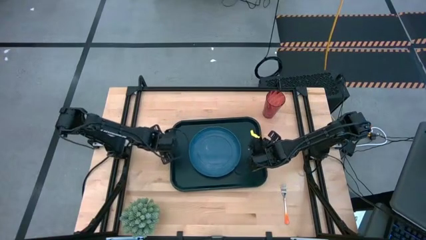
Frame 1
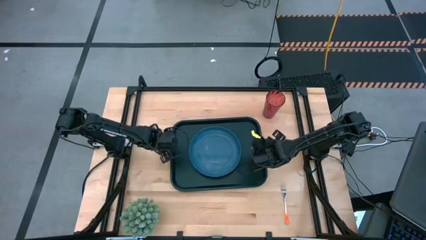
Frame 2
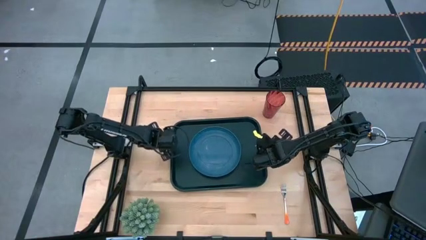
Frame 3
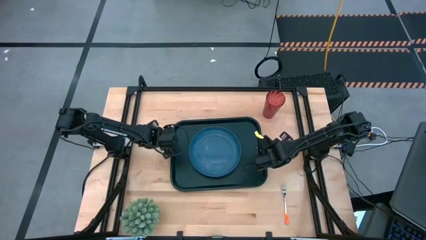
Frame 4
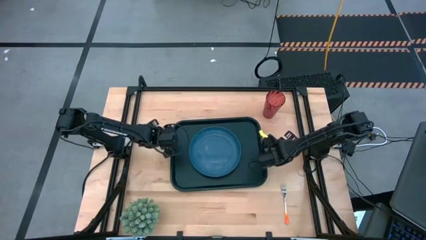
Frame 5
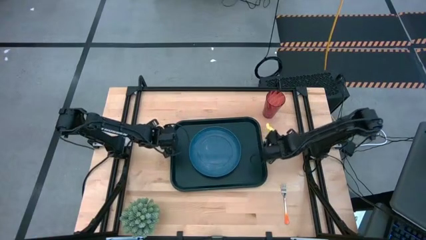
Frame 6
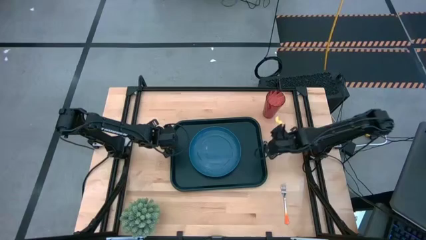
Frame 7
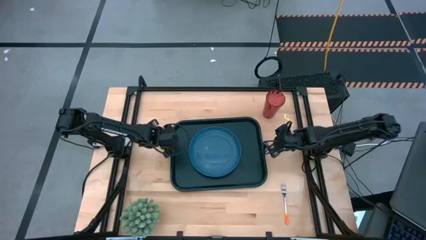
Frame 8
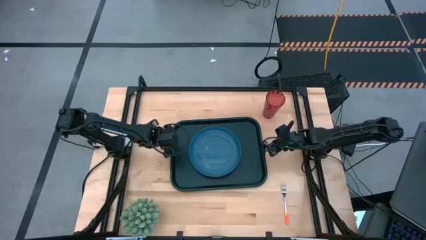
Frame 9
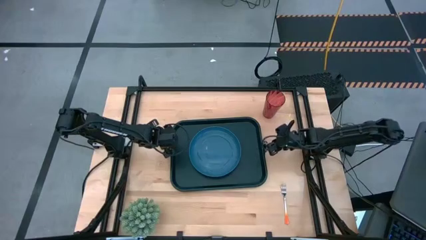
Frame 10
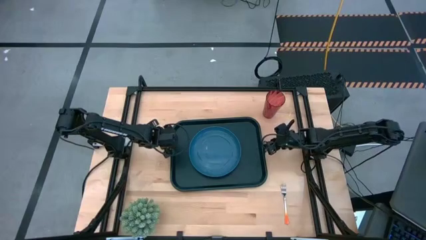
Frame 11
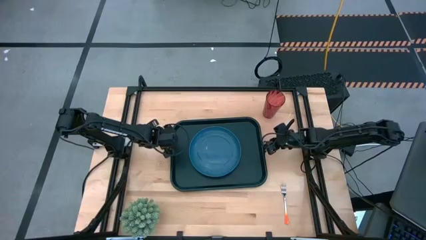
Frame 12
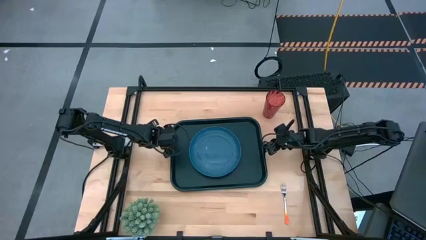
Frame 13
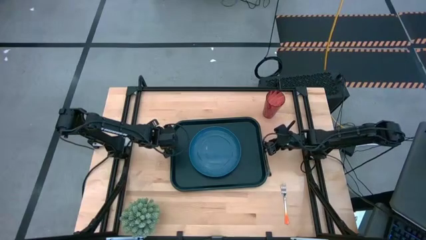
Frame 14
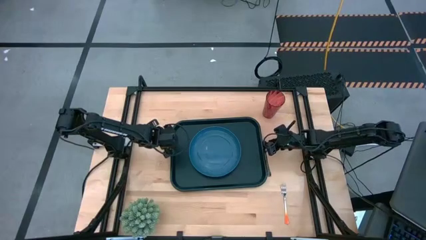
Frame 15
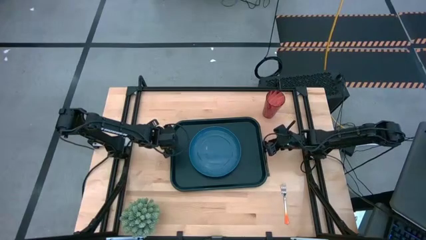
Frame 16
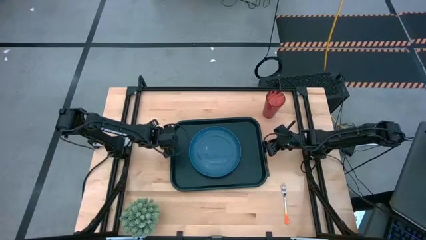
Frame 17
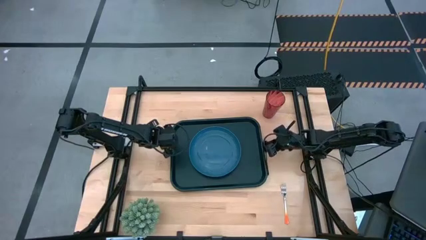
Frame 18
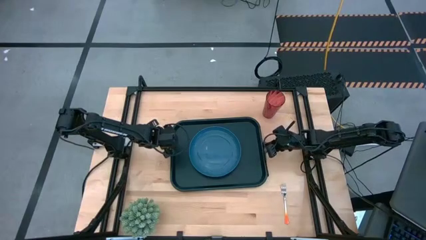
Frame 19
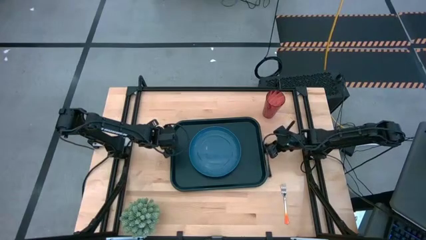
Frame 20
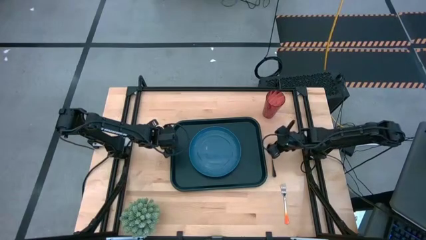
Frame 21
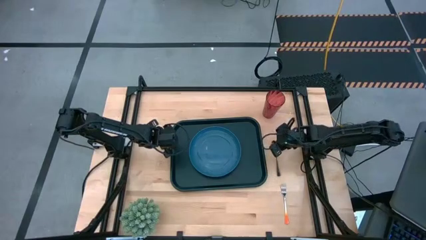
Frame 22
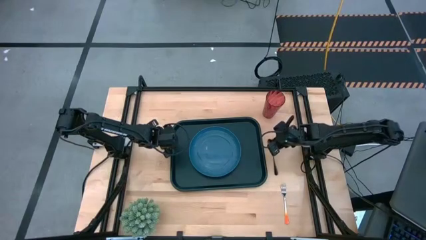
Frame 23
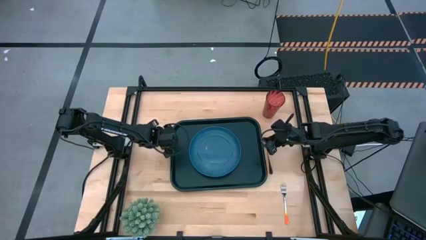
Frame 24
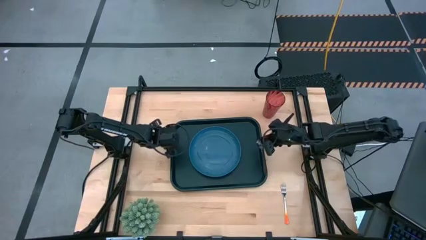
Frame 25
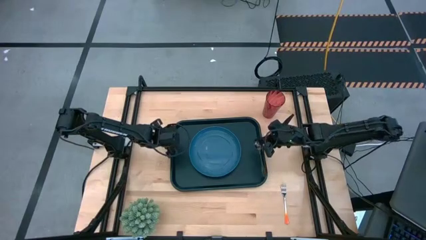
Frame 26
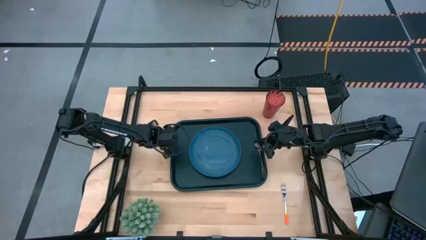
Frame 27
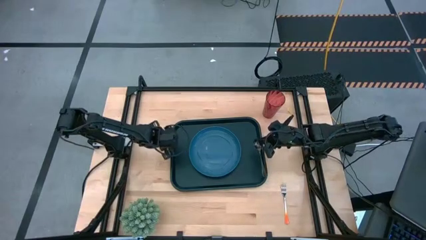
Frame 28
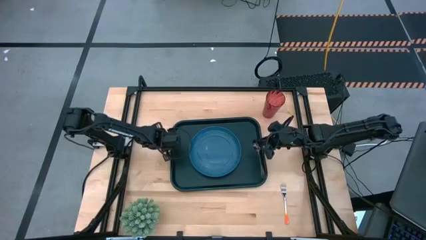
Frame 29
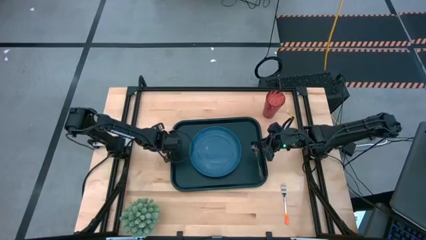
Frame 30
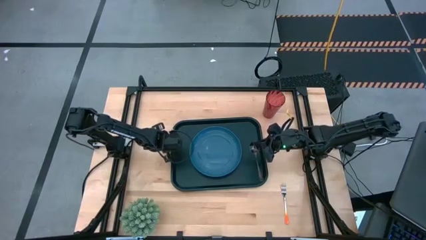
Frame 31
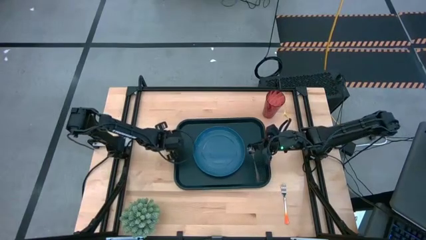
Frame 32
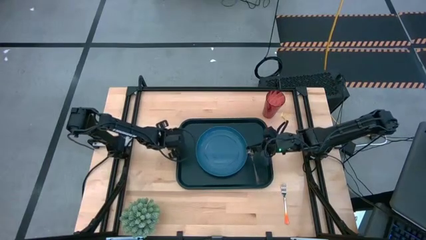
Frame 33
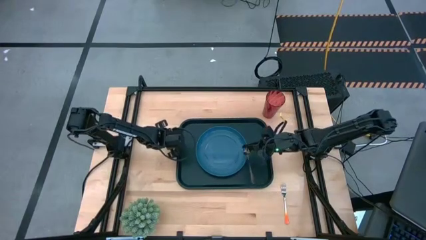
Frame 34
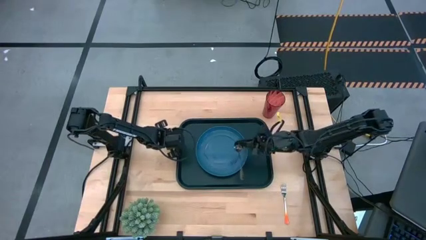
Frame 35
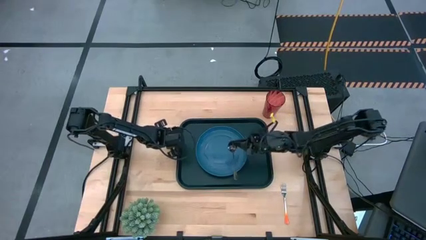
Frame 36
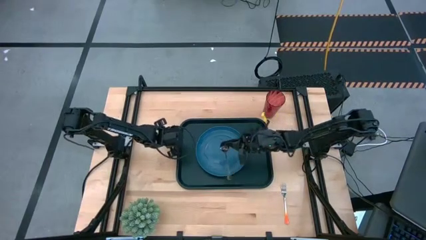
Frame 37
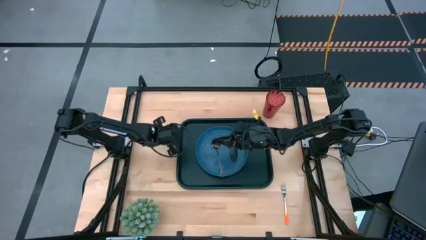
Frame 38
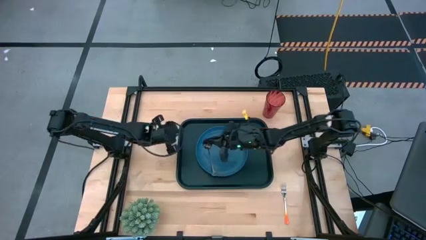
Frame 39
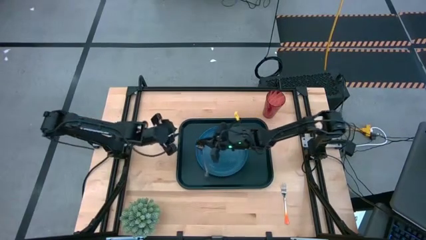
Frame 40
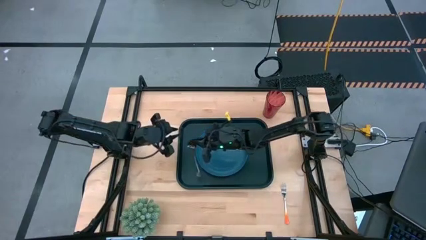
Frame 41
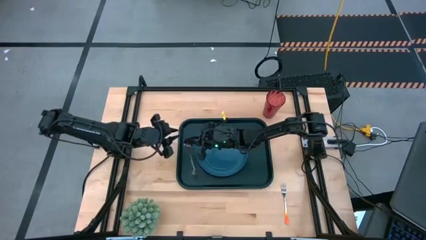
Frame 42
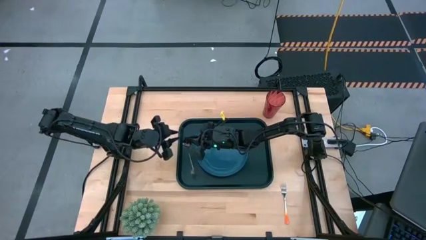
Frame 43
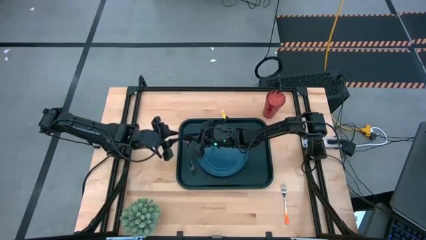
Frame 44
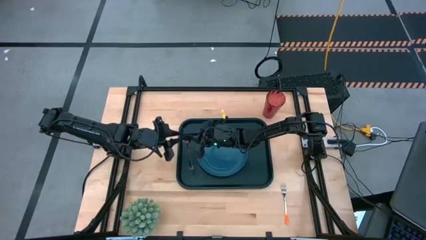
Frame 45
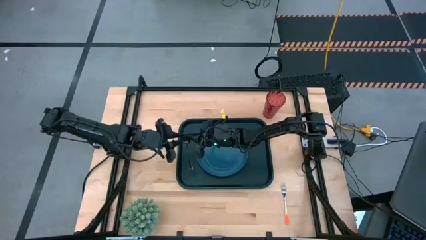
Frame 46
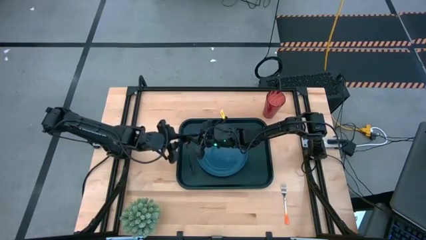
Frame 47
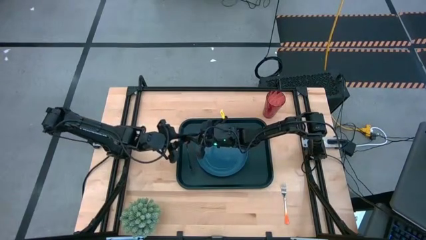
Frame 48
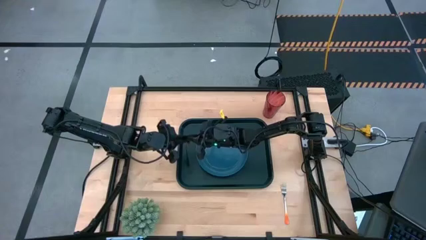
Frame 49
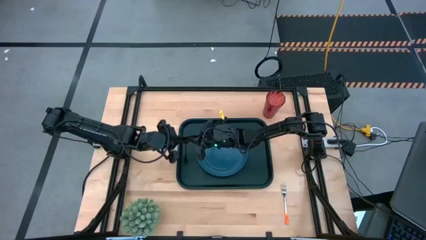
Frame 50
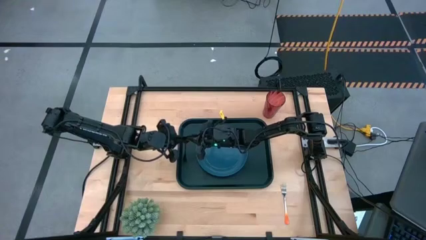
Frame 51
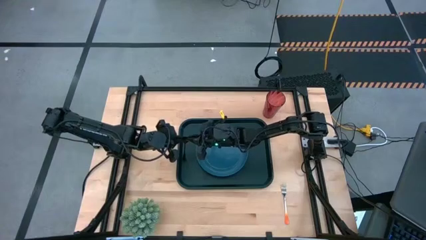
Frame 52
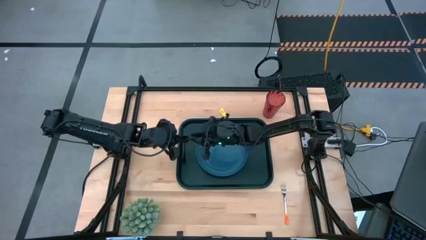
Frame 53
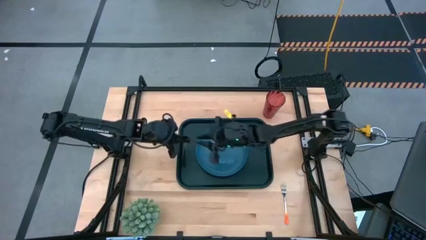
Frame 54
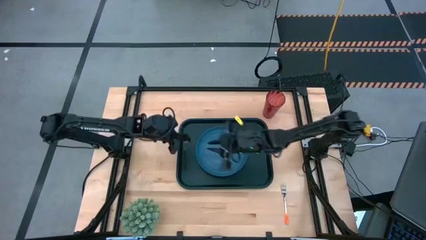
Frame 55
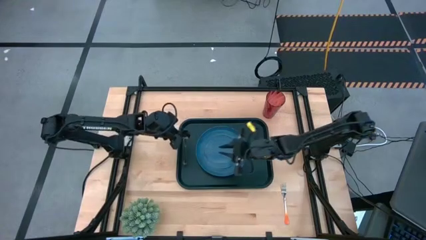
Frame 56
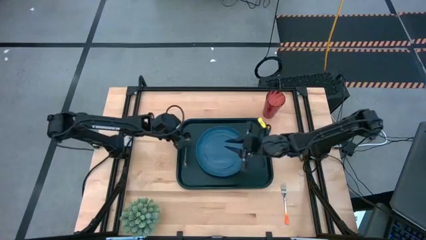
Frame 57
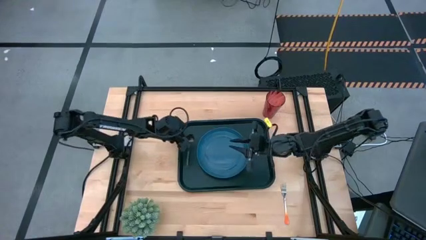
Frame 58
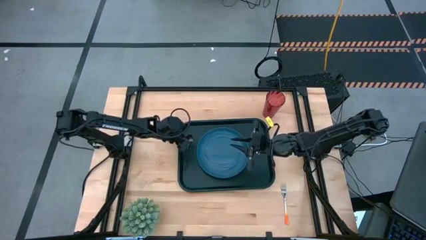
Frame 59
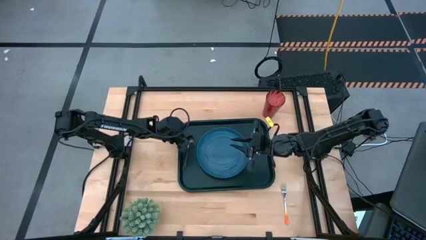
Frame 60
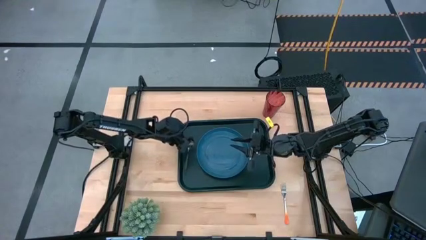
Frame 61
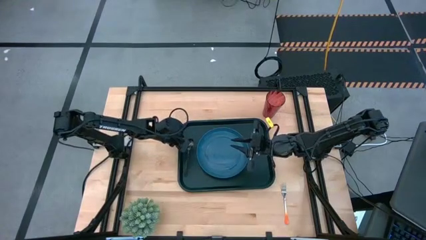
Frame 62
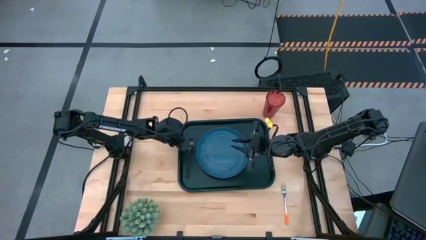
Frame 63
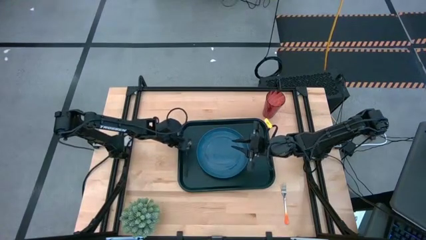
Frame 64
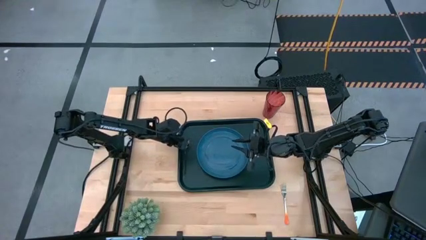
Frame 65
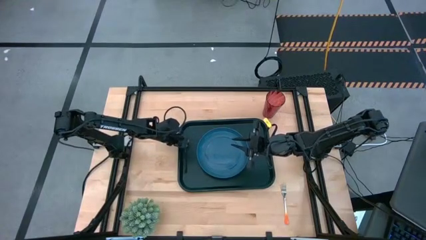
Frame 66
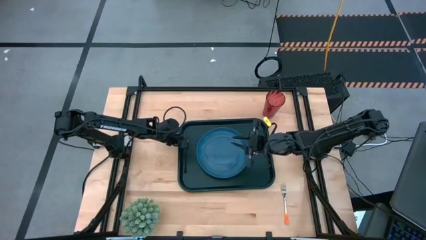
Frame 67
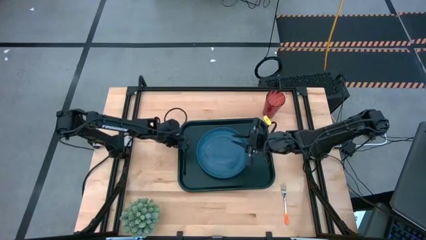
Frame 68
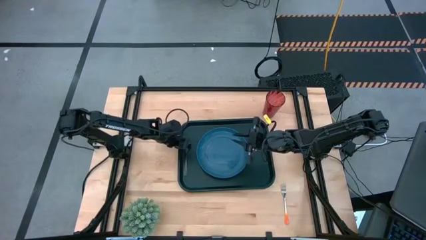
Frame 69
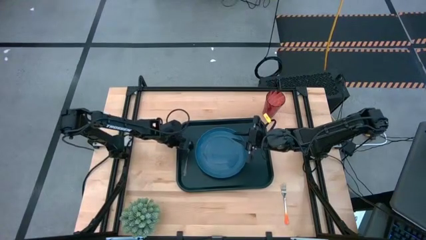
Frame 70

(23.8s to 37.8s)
Task: Pick and place plate/cup/fork/spoon on tray
Put the black spoon to the left of the blue plate on the black tray

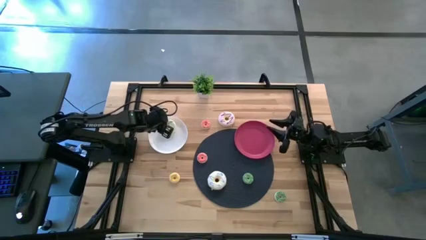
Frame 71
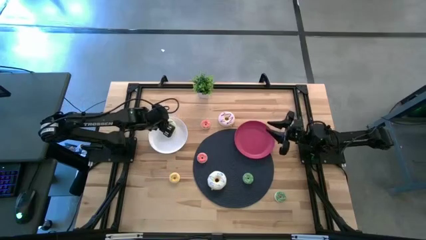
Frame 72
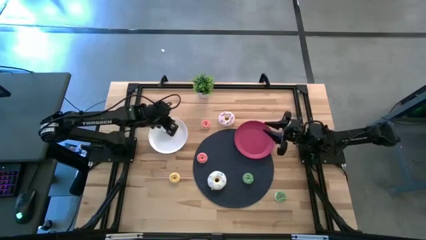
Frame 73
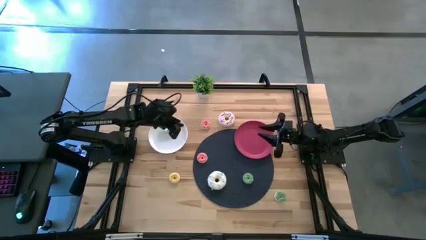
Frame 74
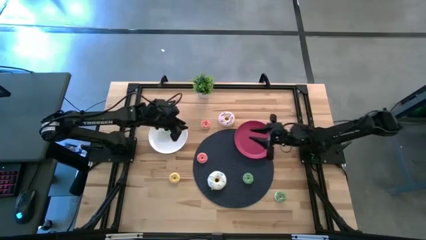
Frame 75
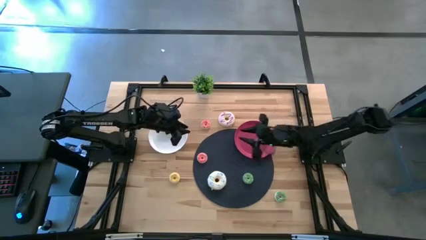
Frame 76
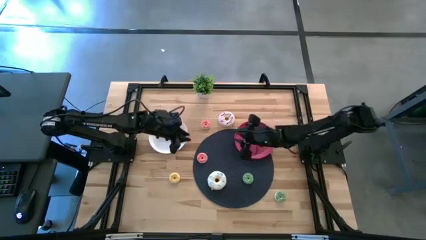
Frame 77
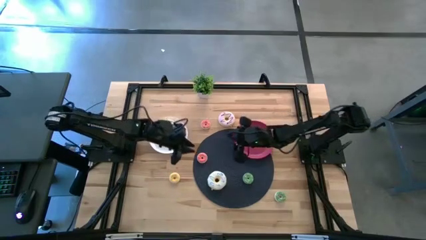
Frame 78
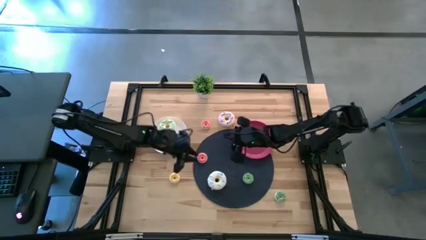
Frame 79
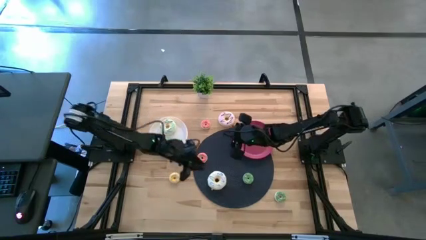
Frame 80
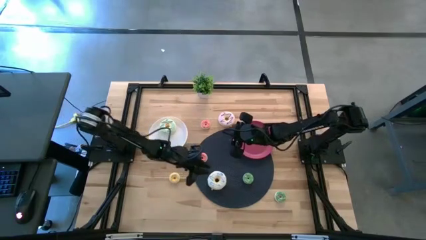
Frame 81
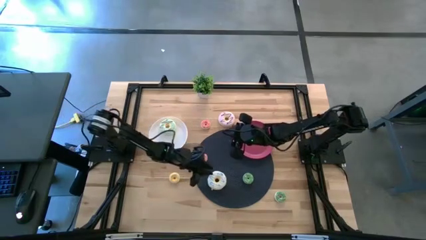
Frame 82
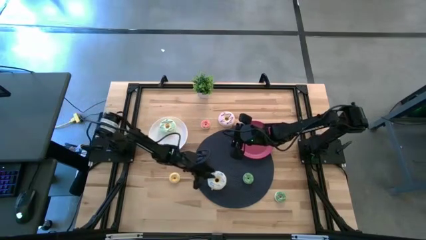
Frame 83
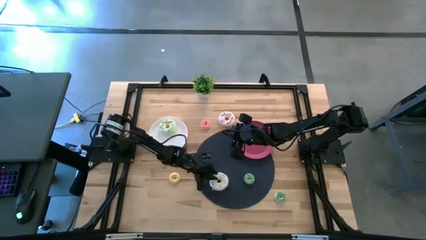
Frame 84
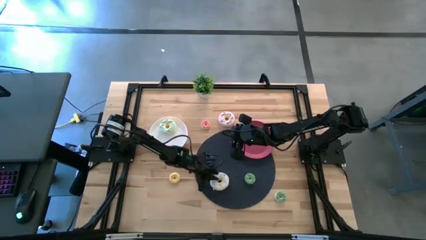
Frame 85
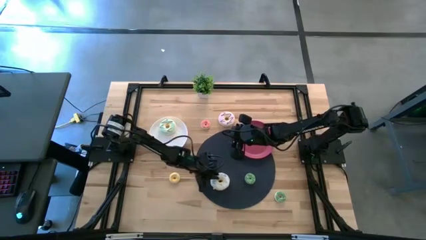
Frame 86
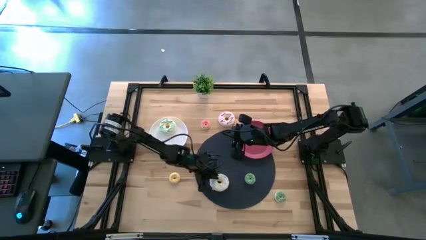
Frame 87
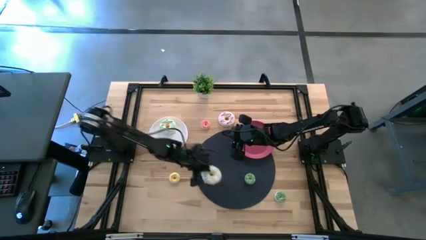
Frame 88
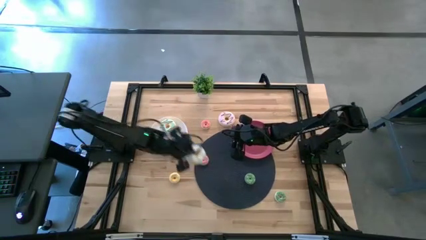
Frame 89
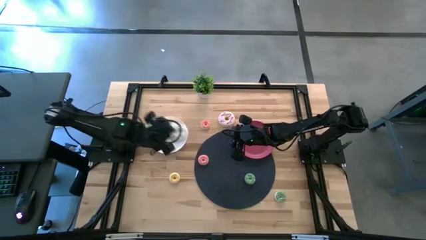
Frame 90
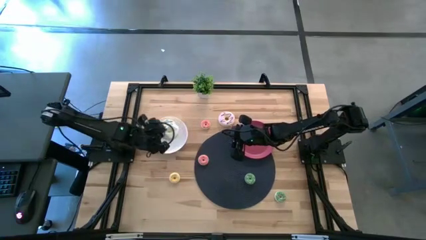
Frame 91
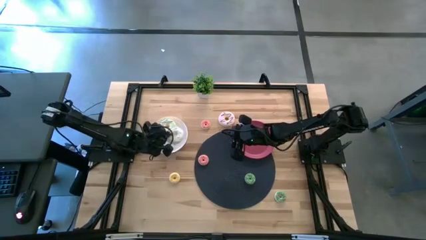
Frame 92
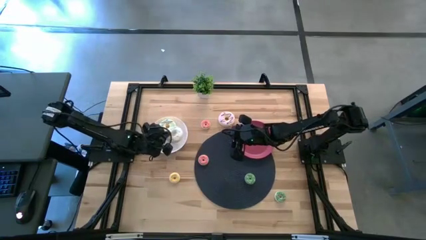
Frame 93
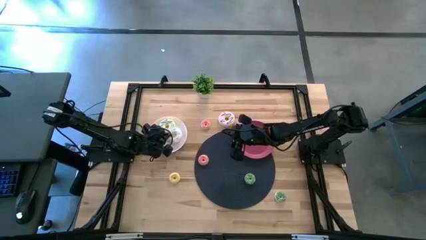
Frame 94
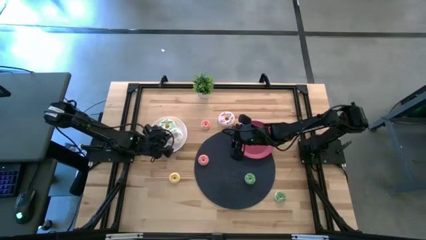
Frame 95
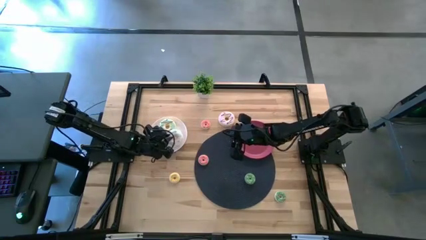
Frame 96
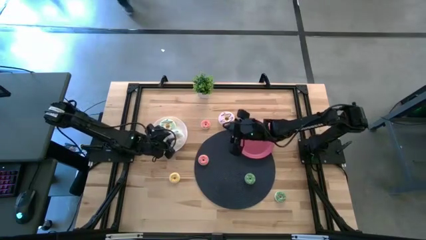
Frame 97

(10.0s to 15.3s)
Task: Pick & Place donuts
Put the white donut onto the white plate
